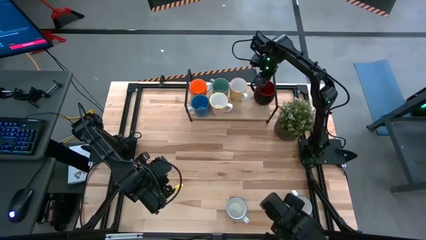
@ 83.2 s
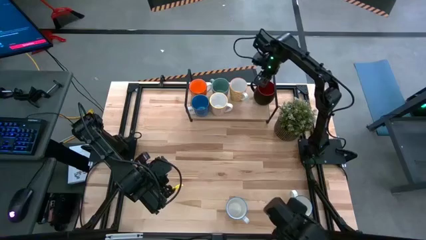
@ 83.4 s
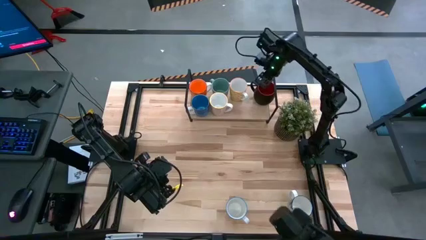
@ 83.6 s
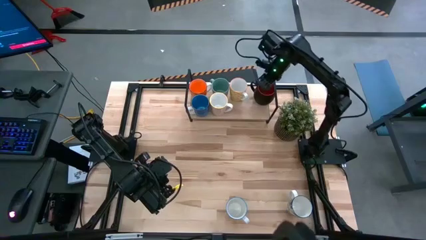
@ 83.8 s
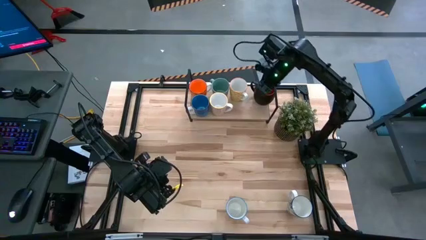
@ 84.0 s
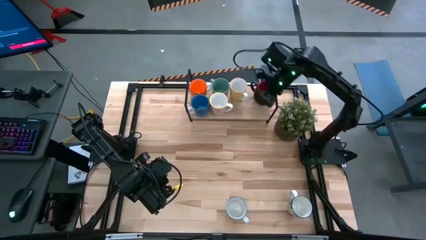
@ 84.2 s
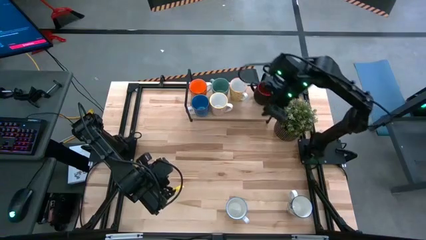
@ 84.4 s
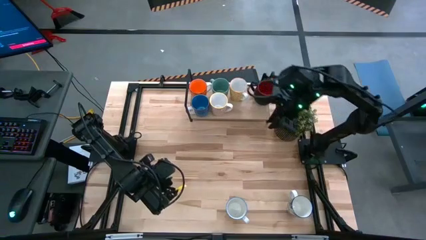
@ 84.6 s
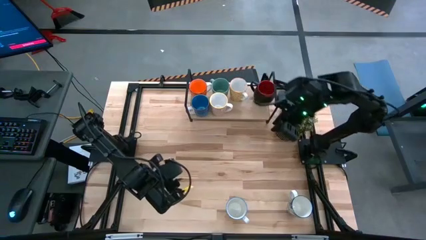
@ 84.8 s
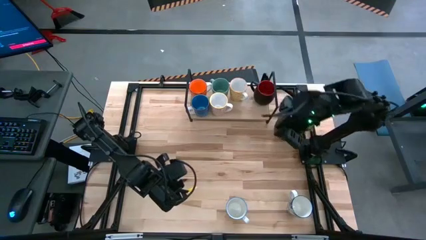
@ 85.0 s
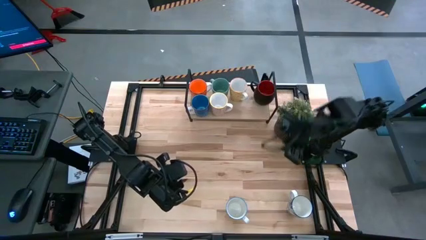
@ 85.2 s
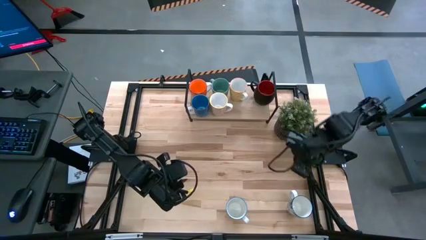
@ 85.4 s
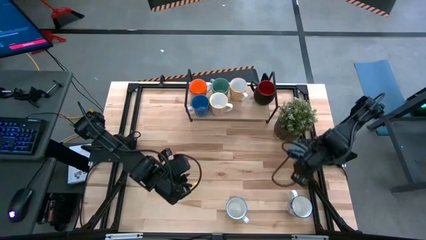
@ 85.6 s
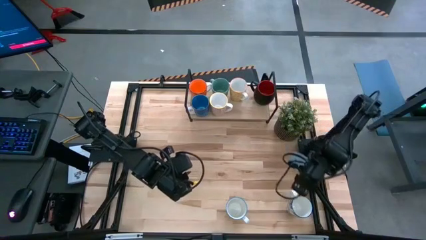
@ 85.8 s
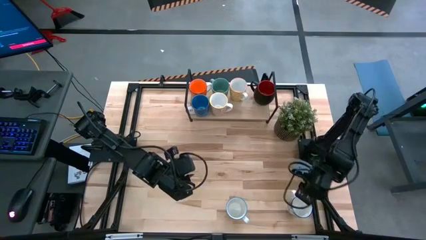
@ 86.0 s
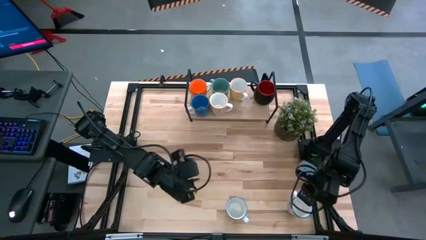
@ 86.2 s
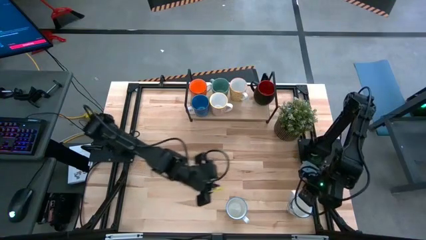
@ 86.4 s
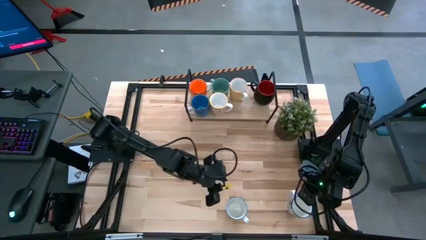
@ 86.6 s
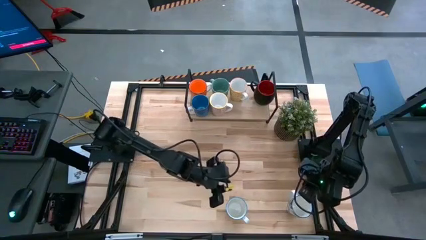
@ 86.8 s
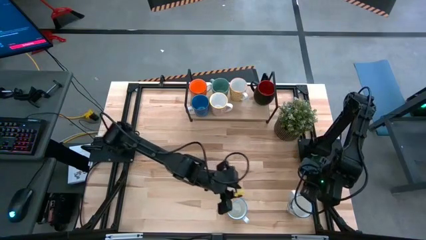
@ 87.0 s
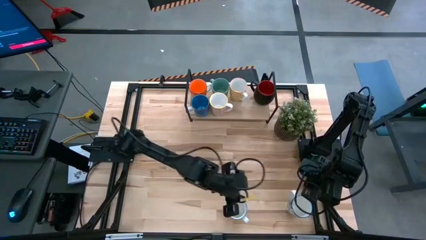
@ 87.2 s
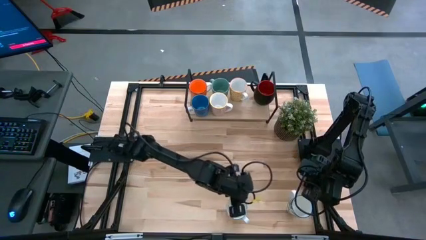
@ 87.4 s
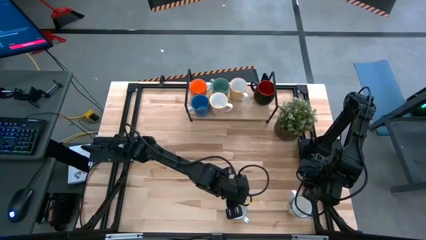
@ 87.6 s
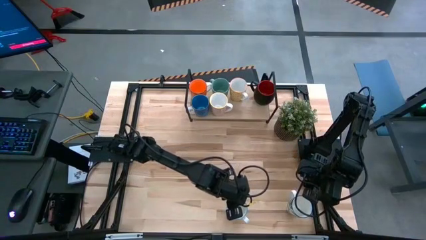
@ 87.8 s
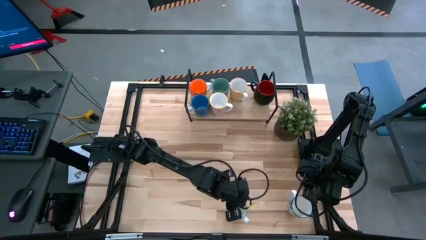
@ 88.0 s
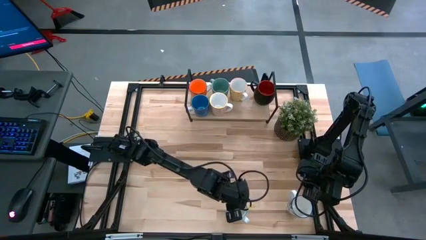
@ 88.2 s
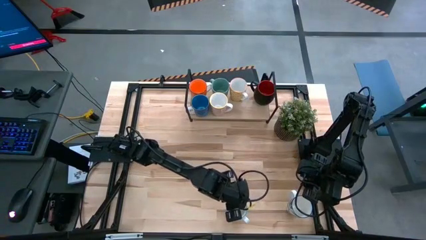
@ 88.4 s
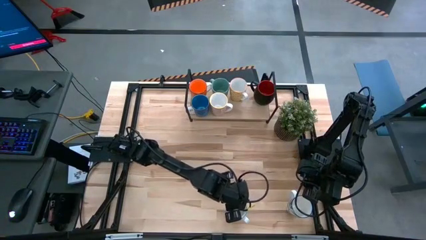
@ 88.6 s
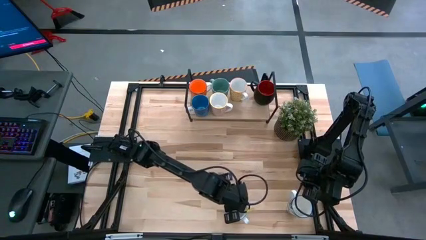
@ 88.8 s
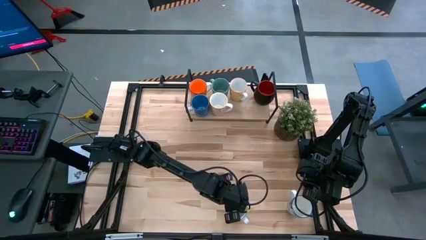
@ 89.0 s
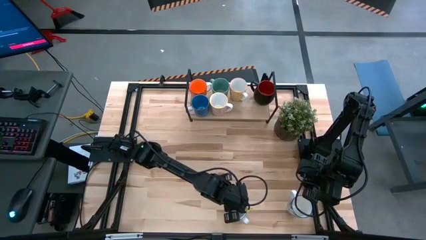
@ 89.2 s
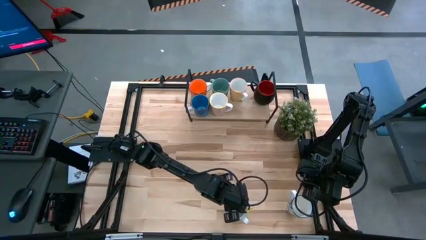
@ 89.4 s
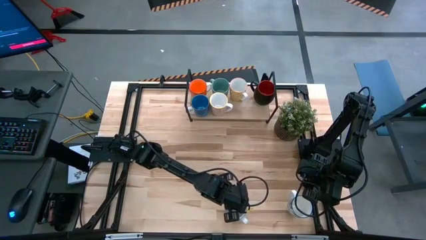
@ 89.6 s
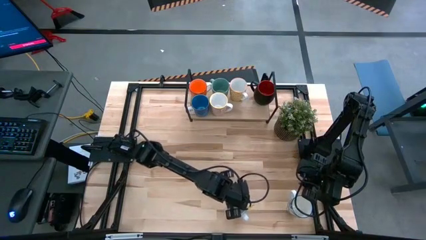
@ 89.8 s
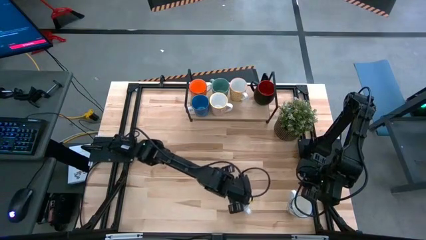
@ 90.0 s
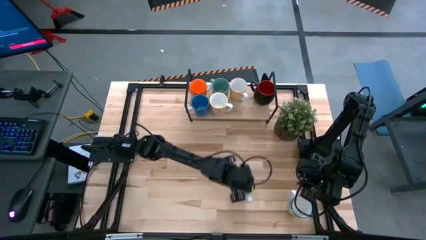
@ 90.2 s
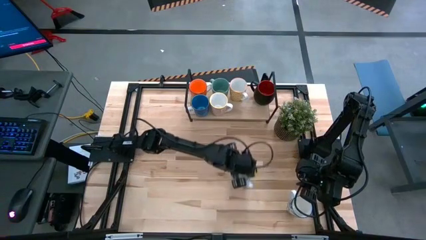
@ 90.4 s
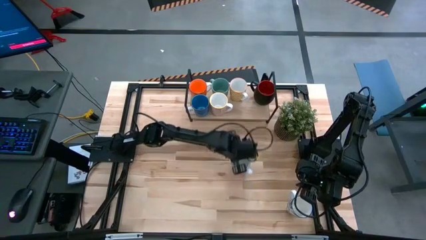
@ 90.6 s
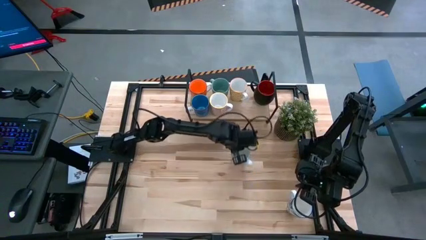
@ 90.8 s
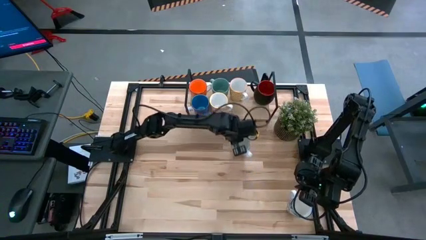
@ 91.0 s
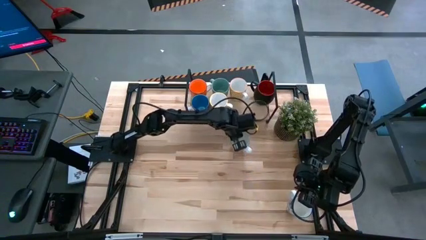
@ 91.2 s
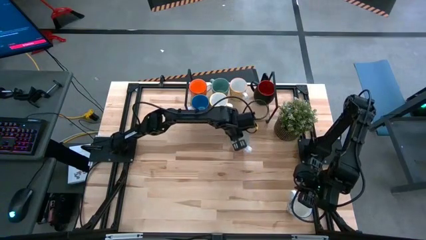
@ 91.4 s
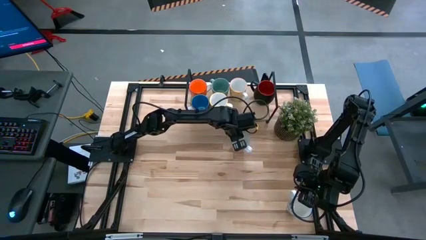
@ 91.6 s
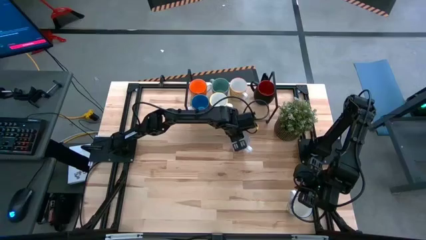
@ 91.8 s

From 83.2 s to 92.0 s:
Task: Place coffee mugs
Move the red patterned mug to the center of the table

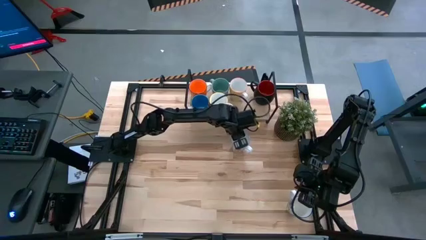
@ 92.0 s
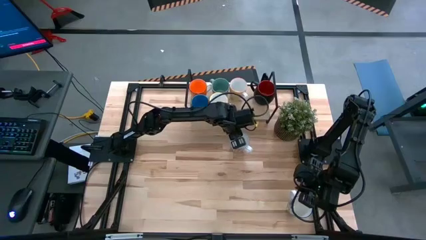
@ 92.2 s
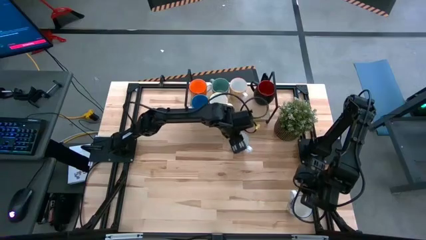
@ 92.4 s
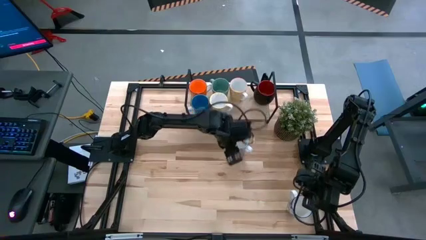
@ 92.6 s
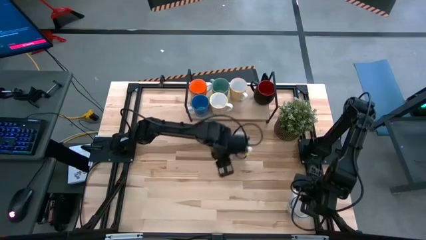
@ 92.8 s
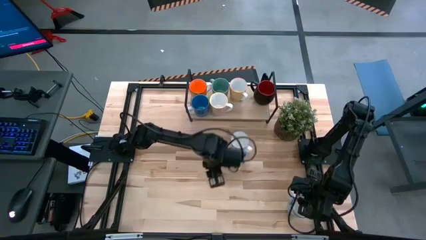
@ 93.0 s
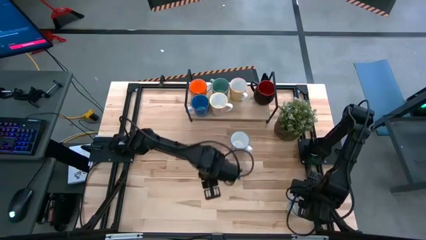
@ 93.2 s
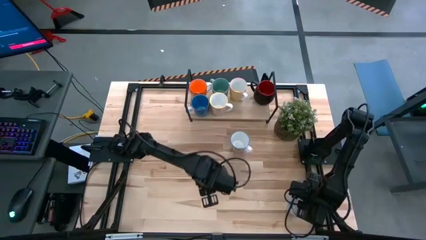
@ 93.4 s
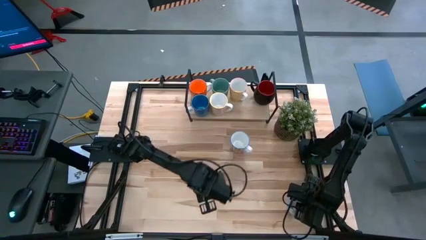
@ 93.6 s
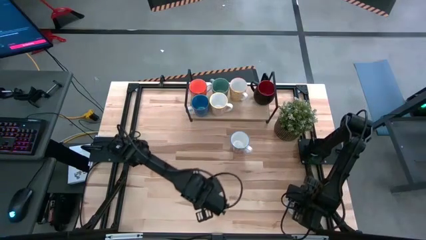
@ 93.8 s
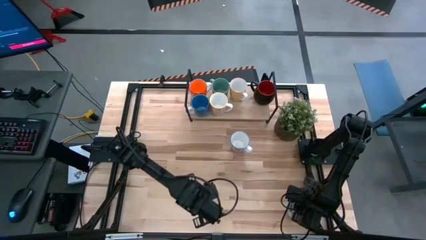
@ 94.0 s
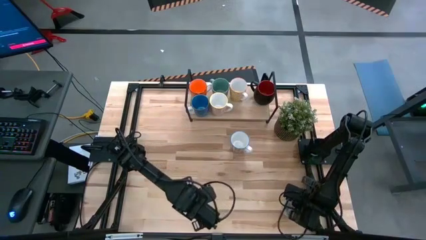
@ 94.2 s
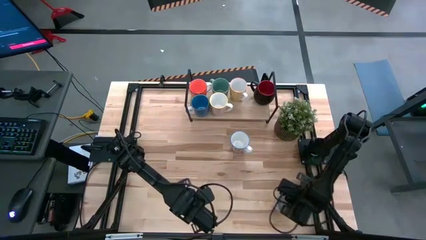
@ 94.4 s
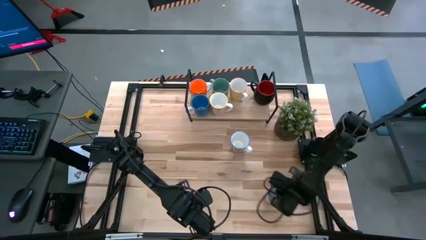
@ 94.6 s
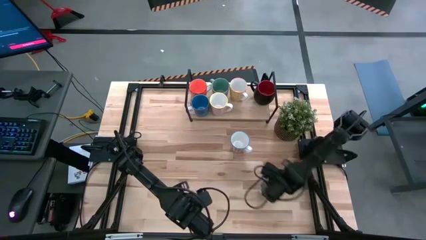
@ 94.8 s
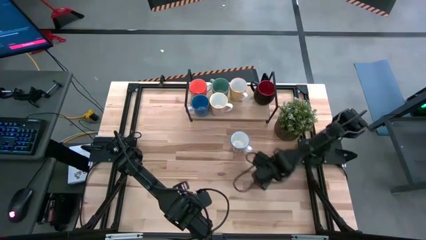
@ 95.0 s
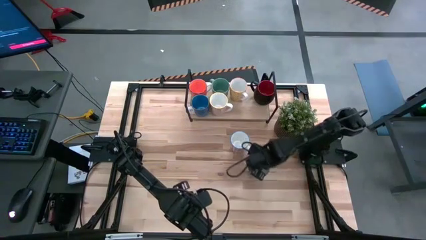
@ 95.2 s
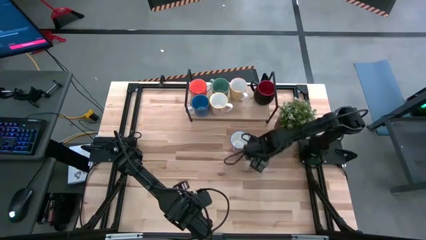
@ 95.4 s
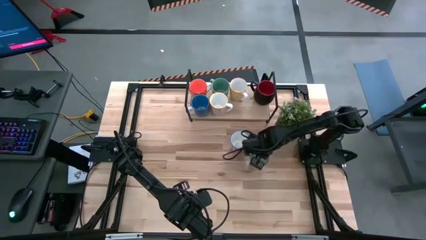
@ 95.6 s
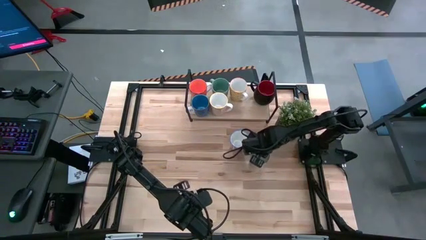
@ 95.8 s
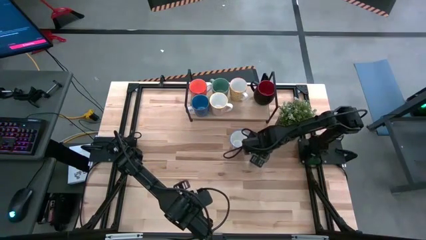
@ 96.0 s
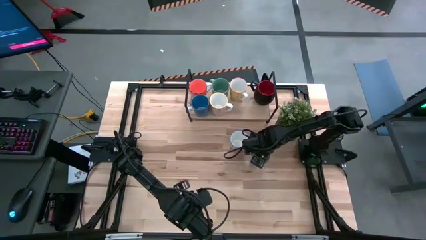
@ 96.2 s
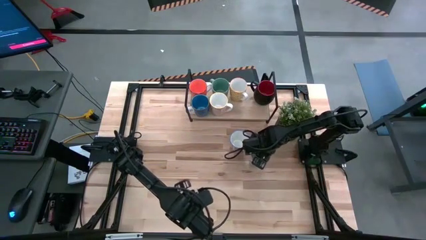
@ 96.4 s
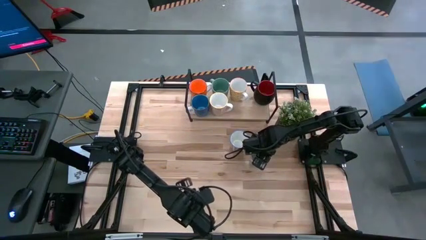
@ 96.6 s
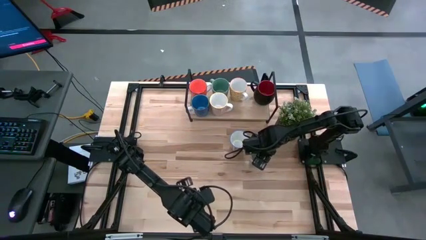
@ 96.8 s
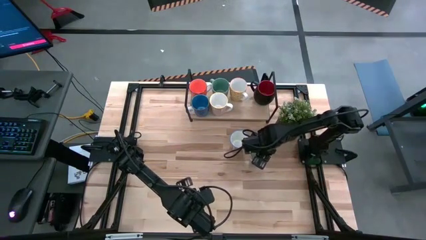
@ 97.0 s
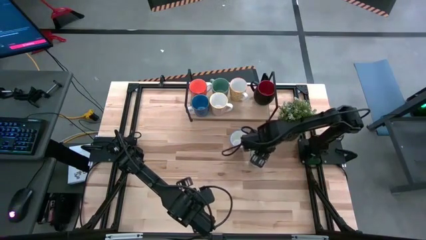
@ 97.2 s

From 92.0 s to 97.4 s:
Move the blue patterned mug to the center of the table
